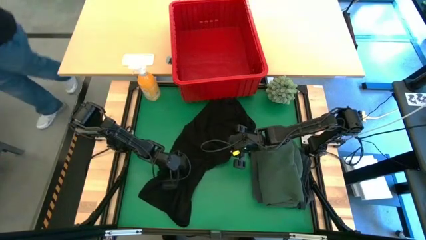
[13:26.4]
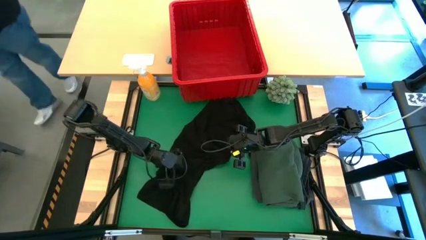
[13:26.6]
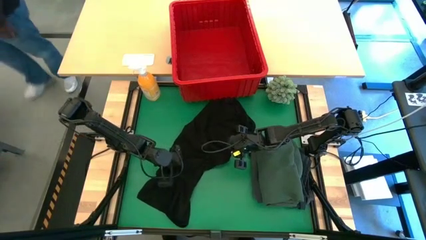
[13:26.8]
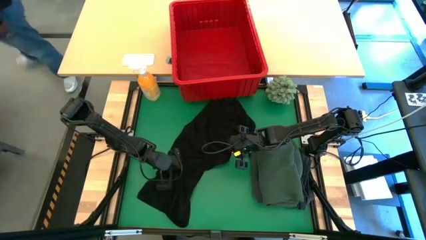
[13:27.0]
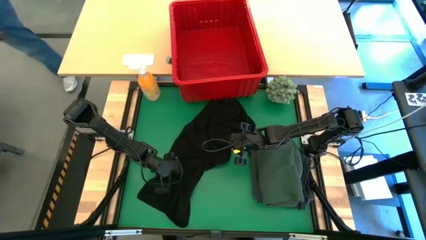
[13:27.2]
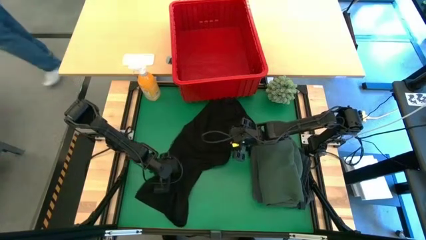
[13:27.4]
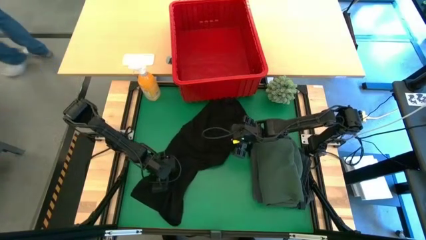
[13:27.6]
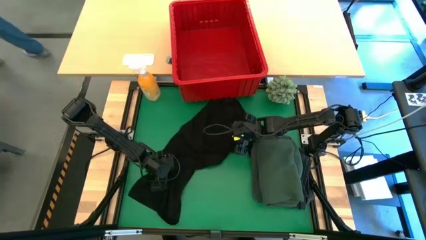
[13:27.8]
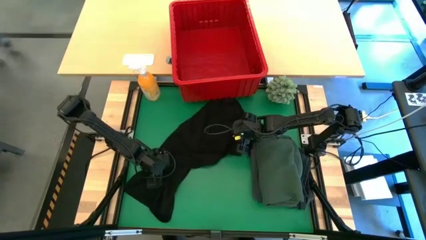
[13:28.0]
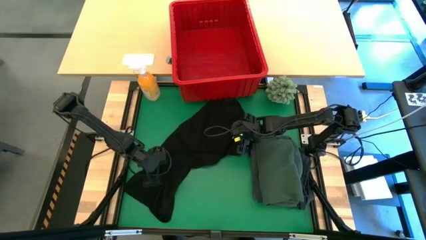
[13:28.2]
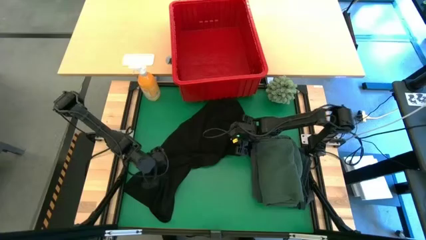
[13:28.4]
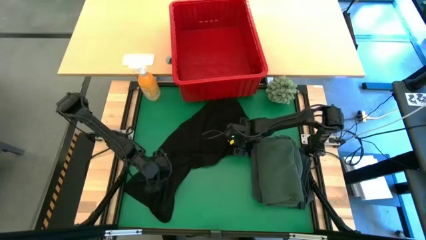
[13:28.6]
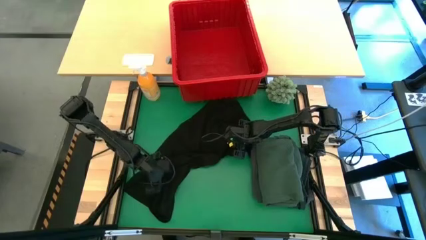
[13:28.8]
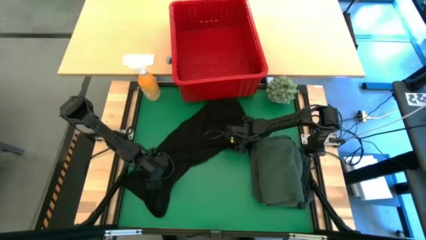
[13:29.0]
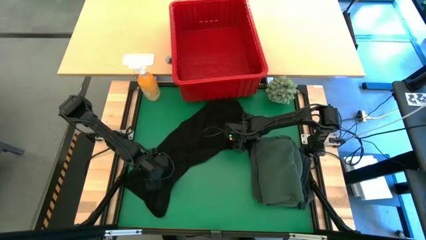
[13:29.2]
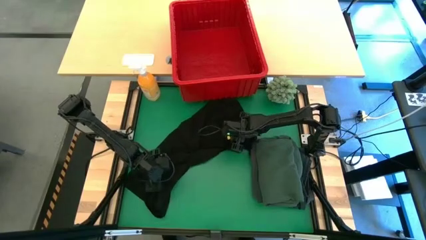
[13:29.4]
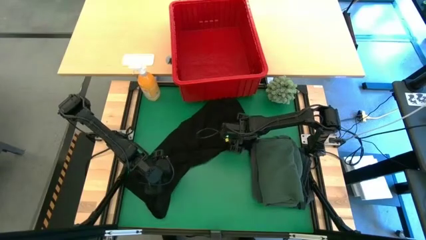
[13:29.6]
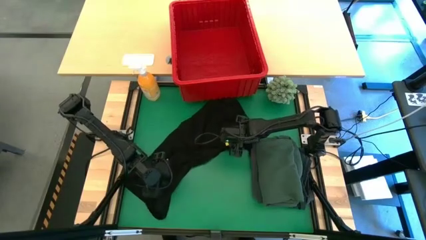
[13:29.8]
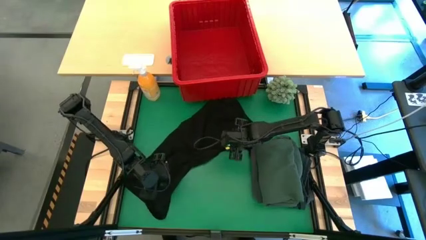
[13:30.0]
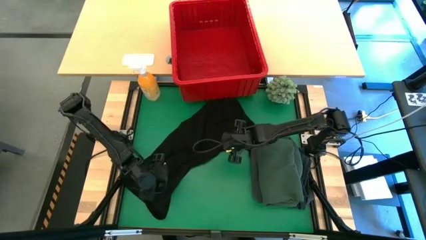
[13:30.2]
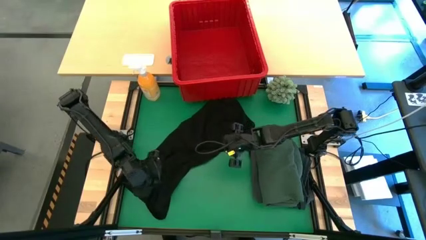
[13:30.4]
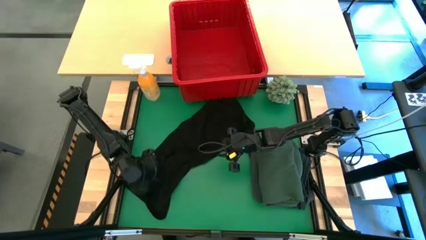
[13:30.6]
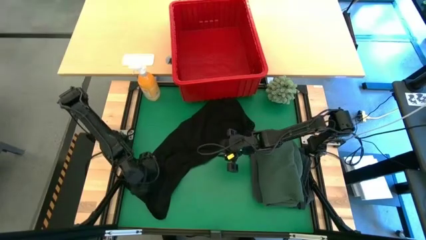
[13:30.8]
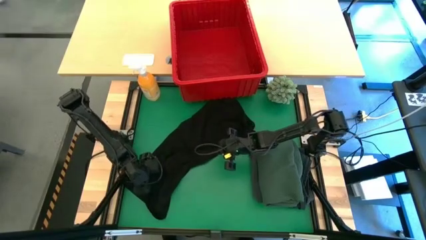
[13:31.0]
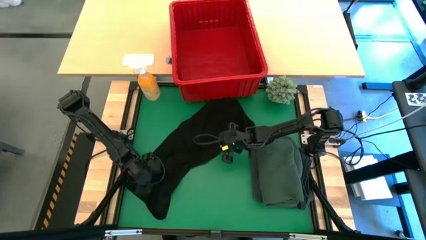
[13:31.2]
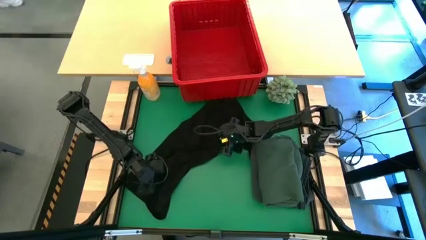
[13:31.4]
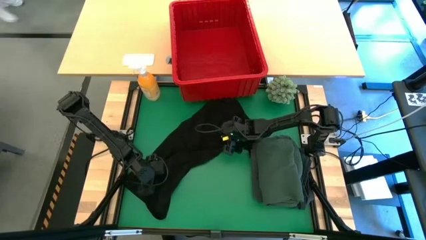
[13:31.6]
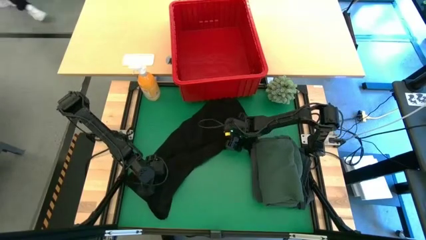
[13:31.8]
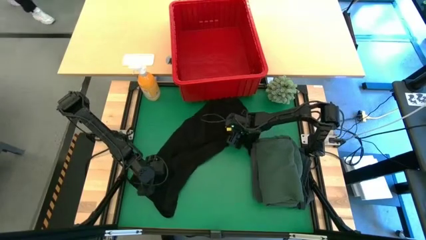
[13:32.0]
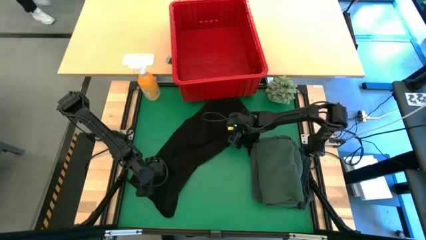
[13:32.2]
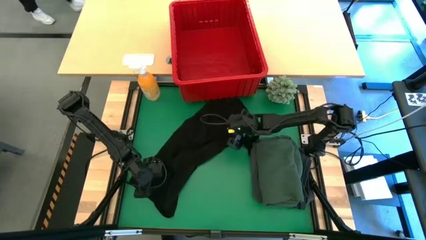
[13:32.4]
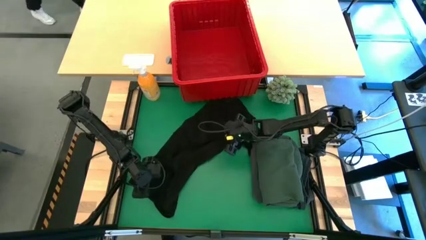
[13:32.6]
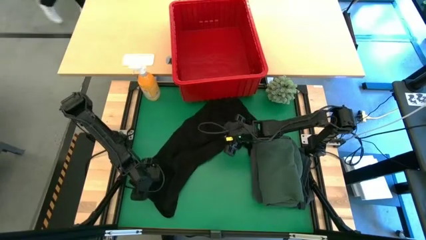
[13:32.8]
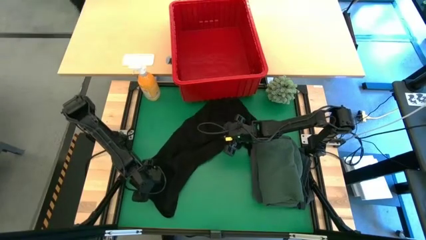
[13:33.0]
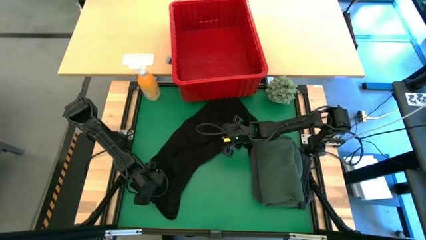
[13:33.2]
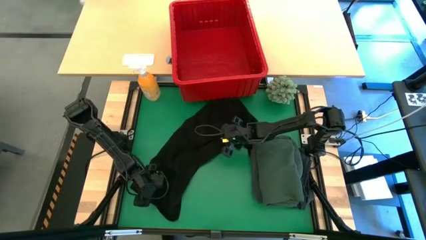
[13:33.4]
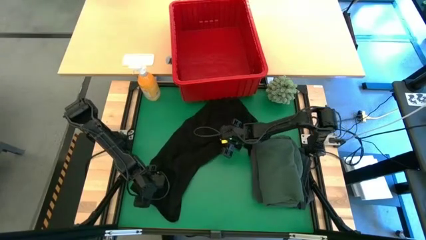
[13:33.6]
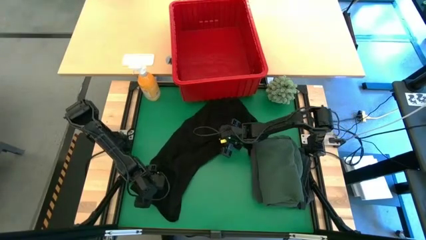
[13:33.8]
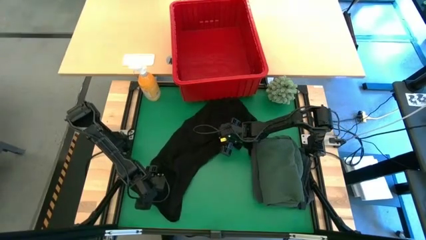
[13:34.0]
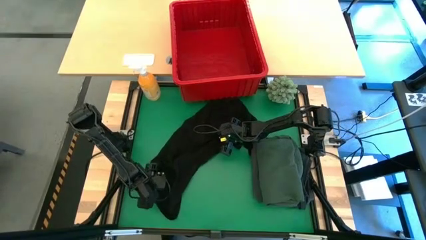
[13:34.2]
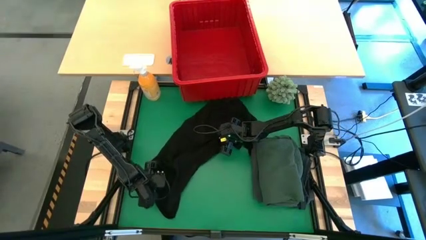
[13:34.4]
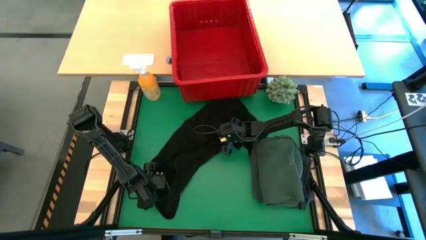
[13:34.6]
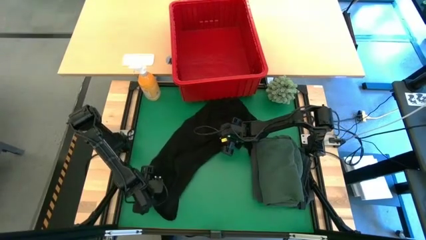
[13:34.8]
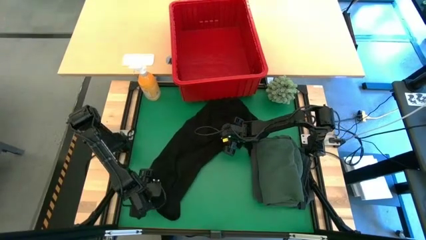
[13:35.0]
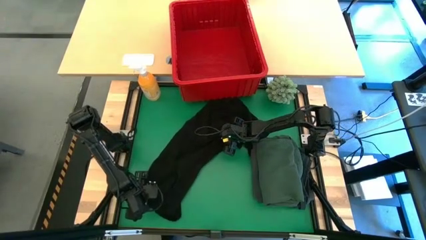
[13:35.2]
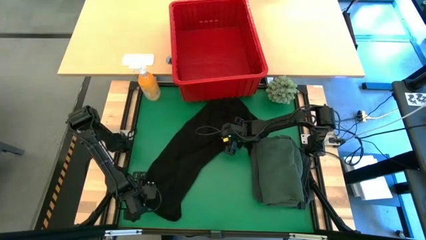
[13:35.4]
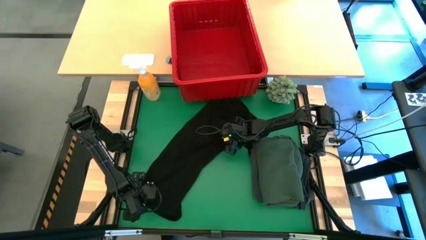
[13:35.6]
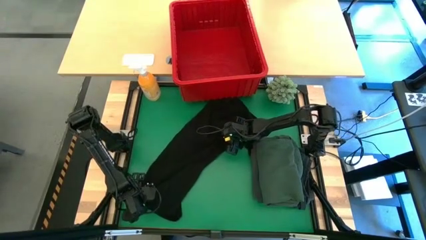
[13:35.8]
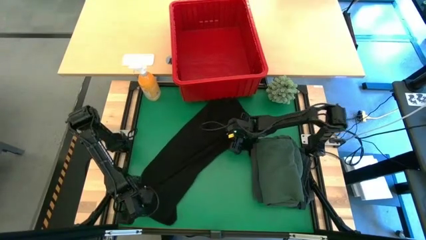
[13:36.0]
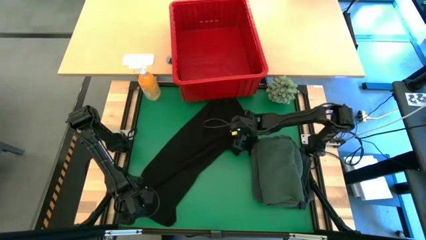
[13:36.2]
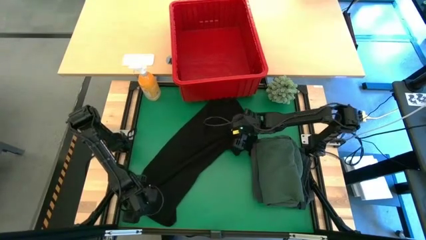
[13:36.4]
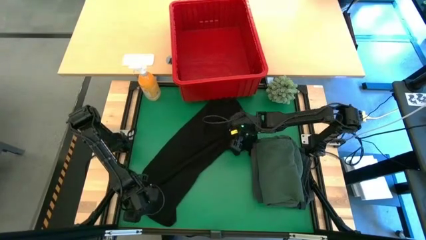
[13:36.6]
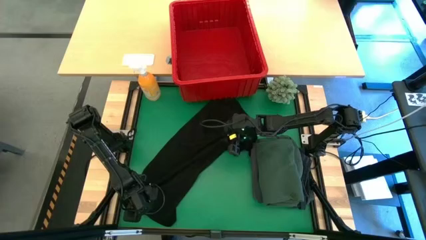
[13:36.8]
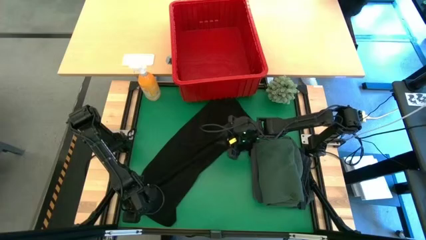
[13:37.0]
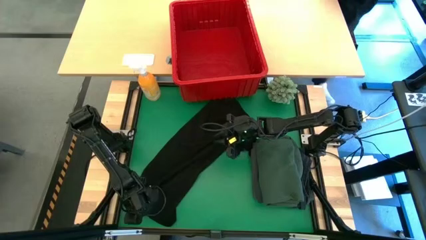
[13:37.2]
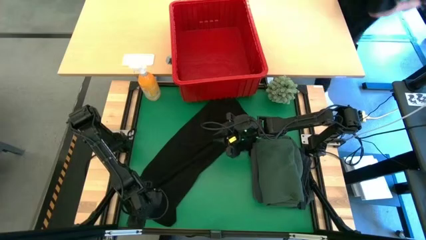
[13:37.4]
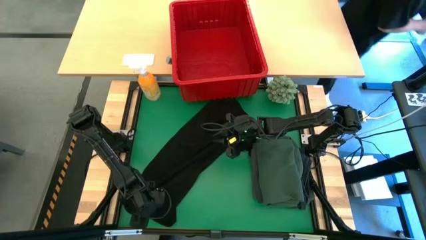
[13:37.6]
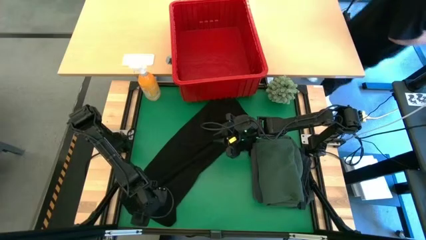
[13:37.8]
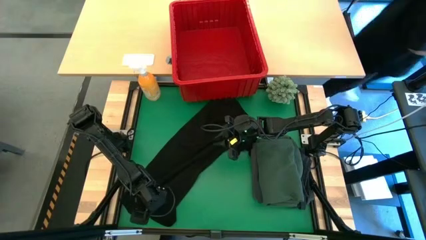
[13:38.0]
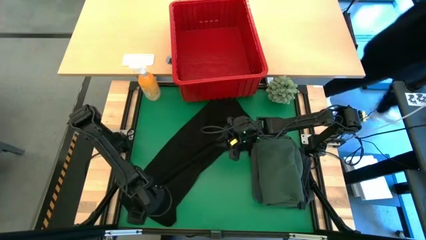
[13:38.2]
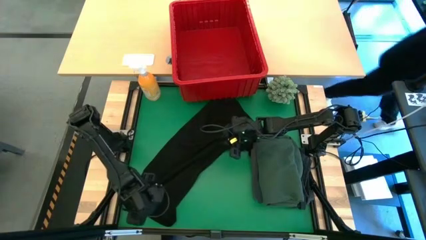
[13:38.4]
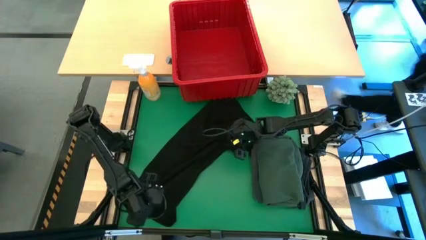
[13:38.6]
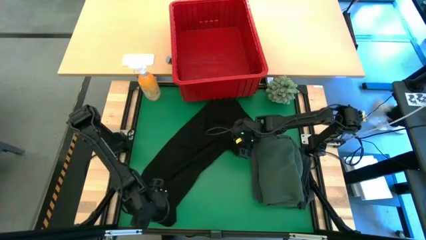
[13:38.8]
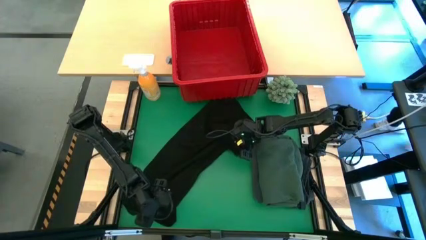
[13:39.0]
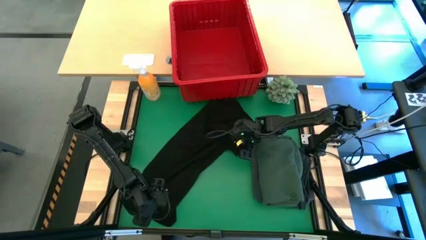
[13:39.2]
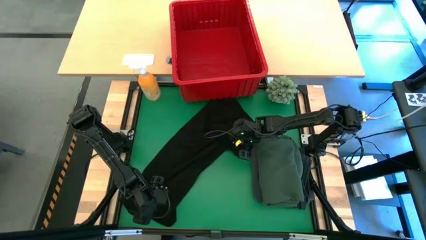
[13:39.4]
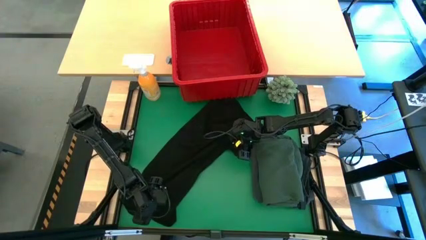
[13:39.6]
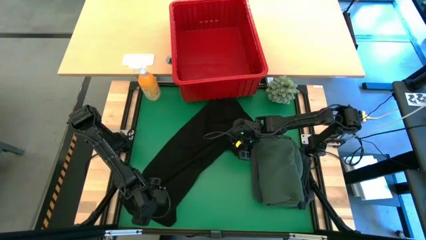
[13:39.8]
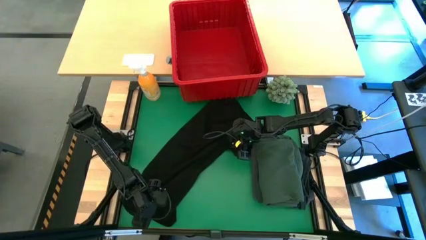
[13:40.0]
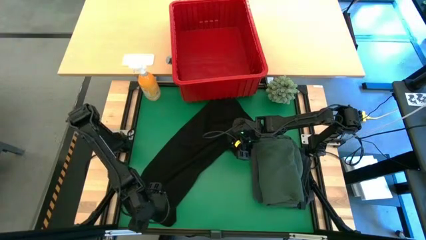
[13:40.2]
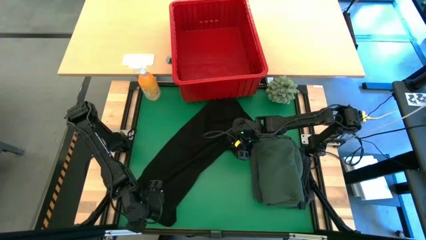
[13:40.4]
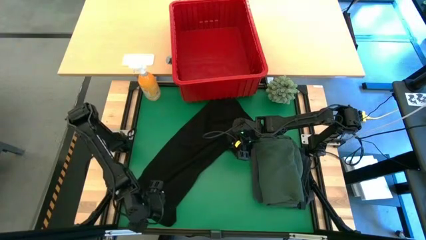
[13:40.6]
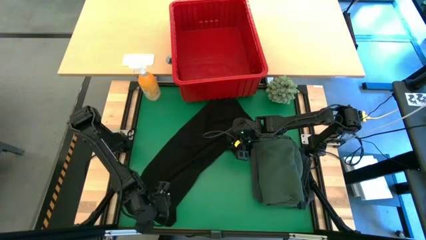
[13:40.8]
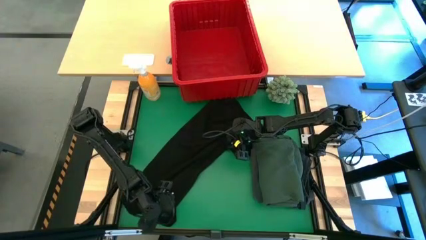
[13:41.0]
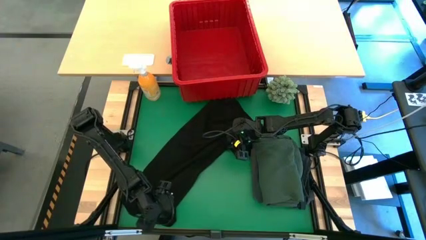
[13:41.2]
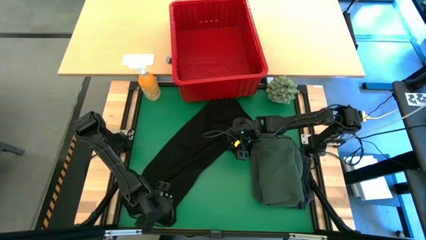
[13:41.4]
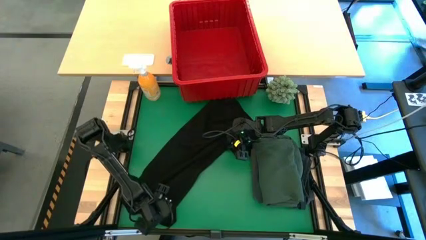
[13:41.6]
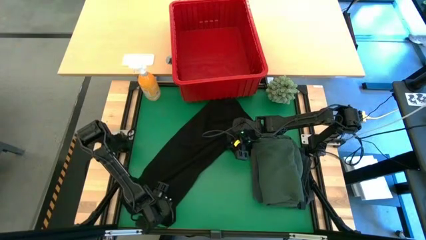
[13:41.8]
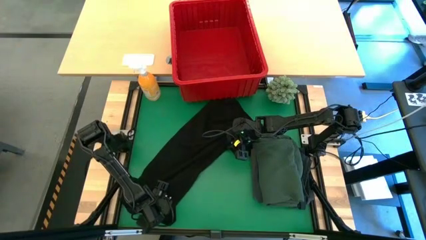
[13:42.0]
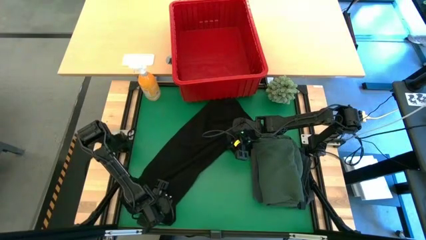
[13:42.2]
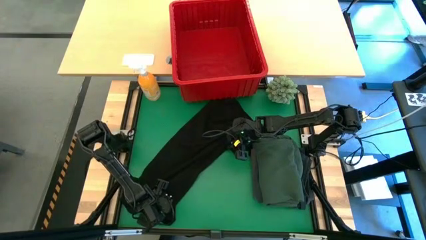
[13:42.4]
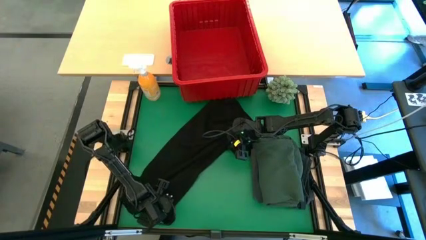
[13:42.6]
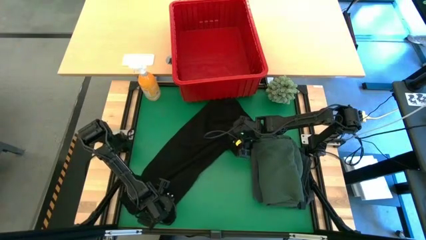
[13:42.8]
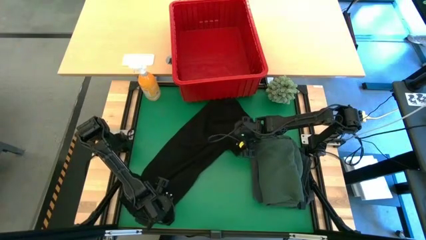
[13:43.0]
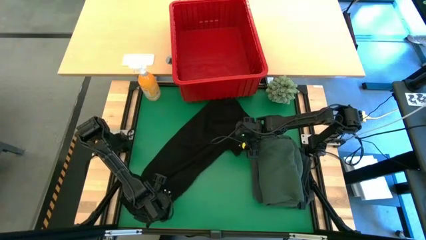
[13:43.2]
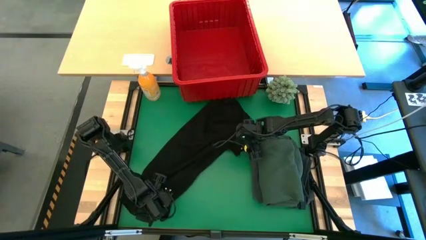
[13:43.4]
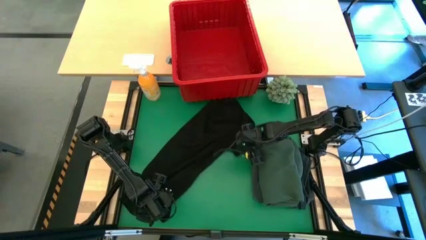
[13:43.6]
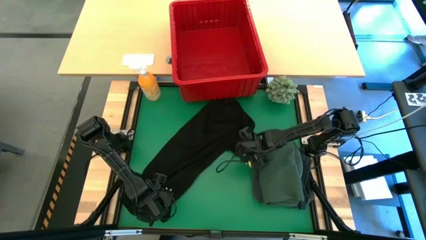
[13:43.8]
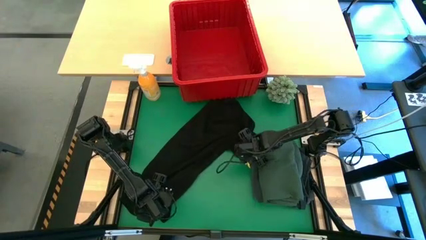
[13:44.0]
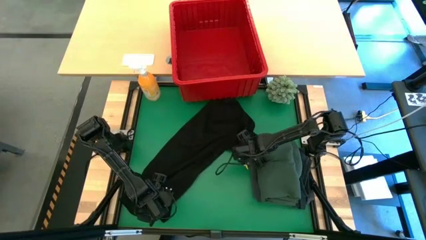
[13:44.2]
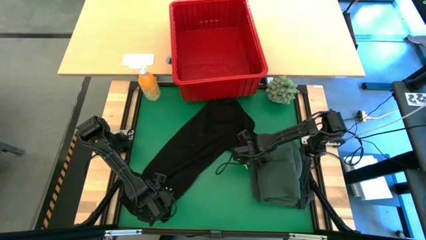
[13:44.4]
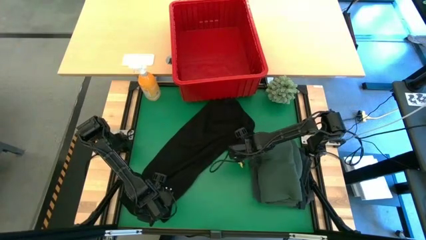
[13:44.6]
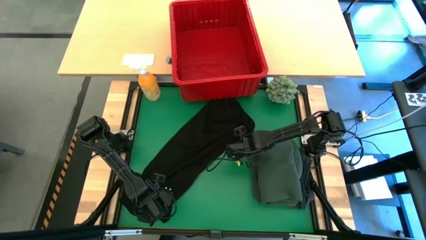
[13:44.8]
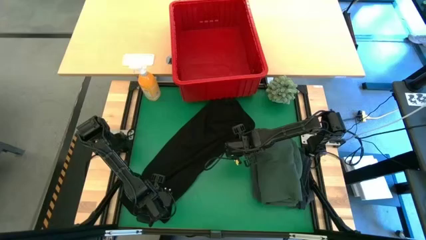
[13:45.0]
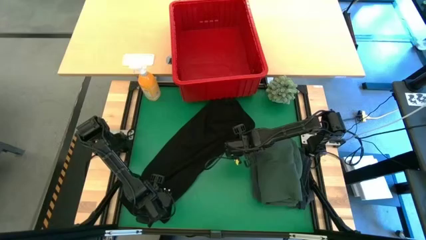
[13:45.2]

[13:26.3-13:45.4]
Task: Fold Laundry from Bin
Fold the black shirt
